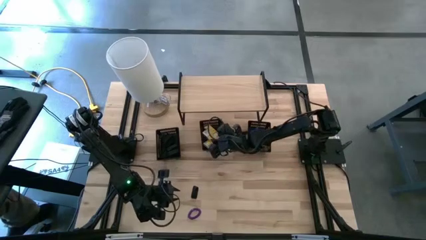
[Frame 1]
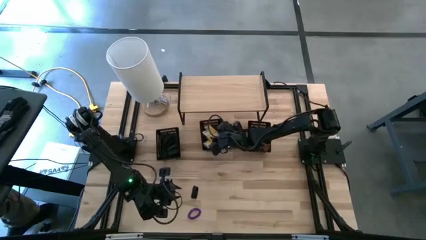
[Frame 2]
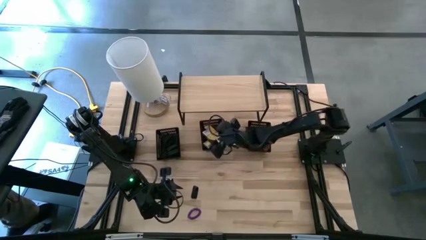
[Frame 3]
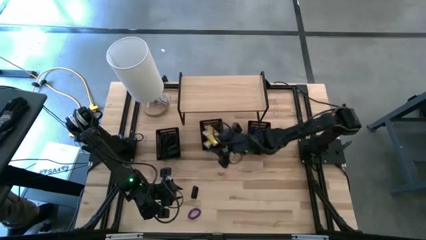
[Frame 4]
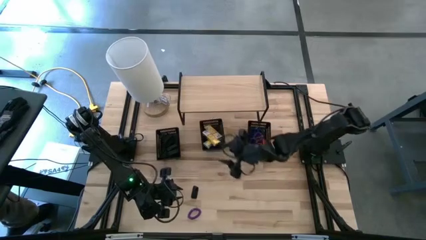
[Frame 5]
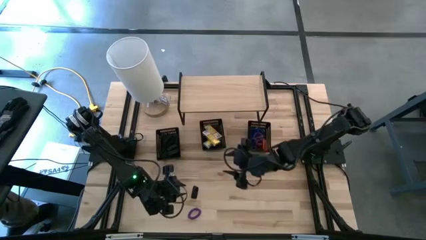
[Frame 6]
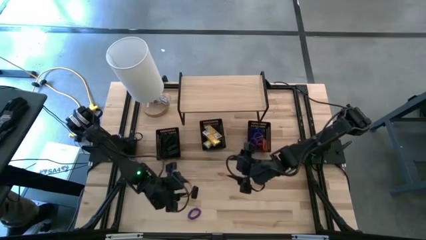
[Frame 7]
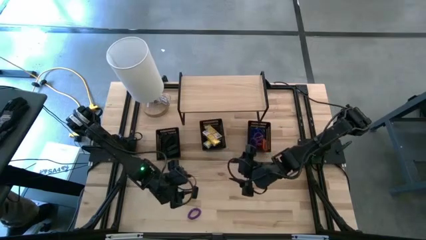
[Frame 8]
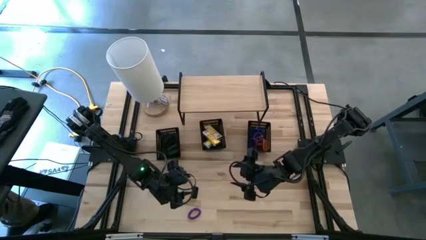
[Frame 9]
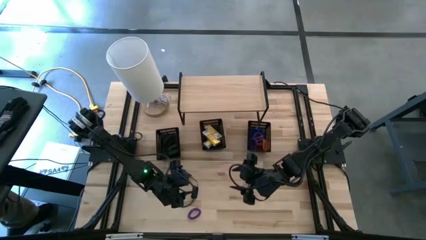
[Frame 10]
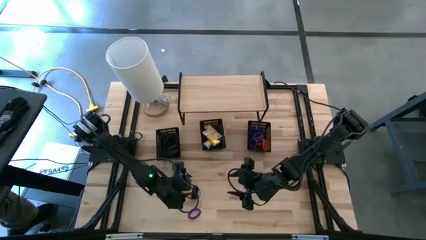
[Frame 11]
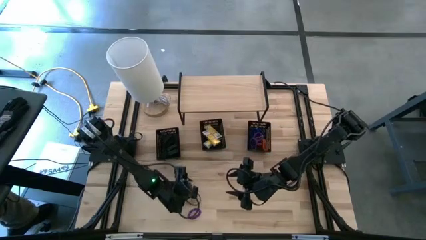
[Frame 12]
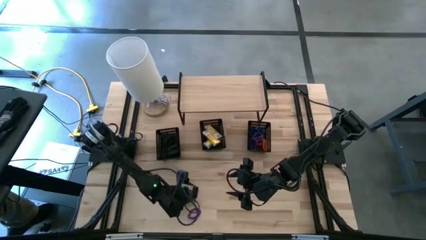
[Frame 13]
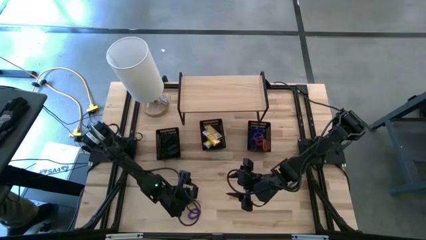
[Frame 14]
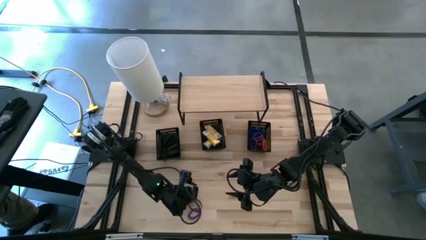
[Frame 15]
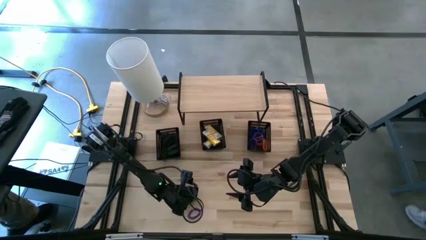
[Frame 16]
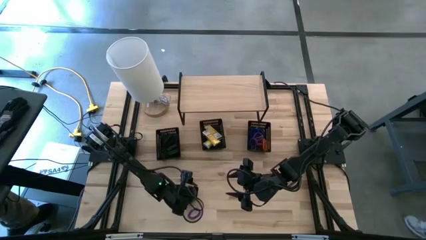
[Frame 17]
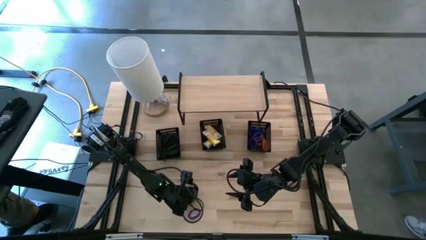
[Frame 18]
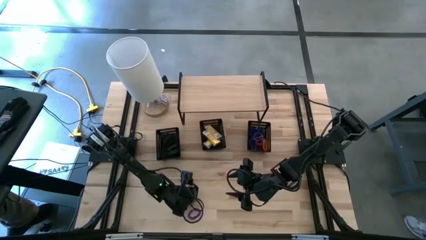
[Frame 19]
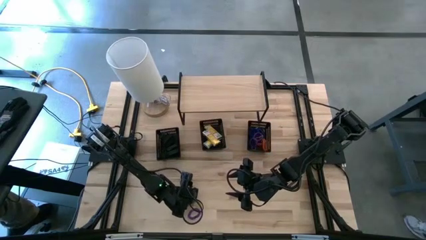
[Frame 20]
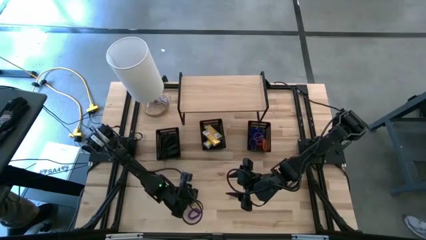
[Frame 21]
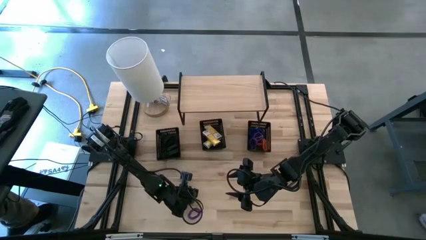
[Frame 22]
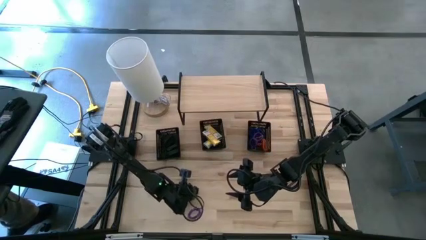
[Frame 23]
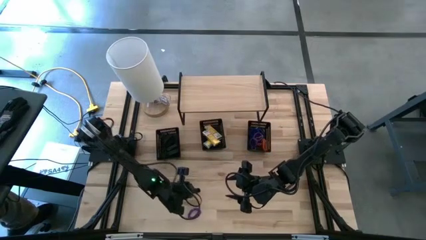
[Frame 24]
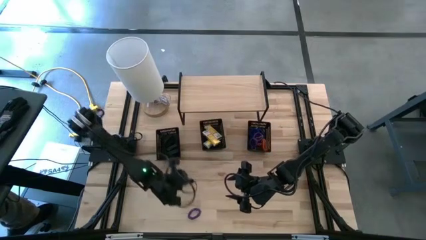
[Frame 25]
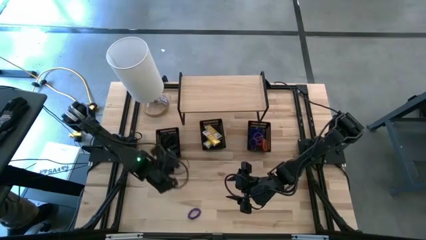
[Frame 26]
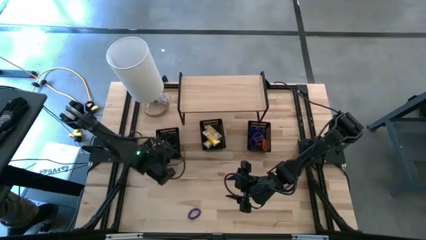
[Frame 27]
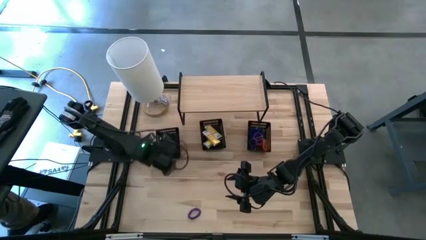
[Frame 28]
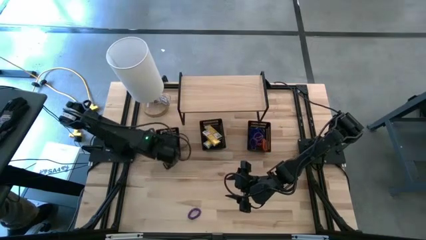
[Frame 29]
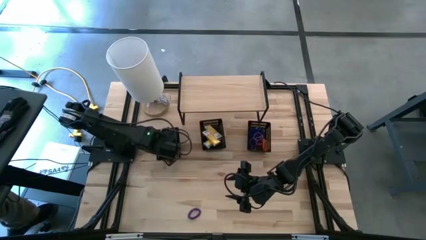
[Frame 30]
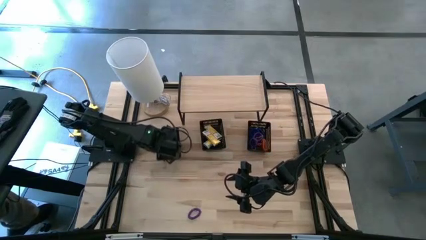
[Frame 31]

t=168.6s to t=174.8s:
Task: Pick & Place Office Desk Supplies
Put the black rubber band into the left black bin

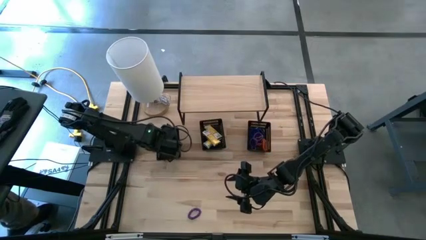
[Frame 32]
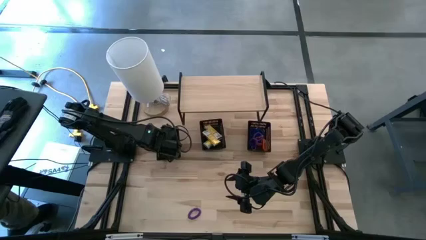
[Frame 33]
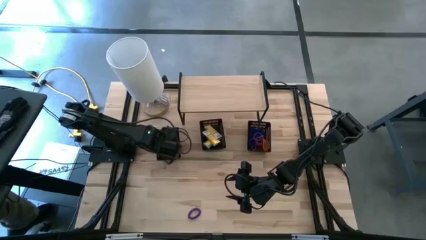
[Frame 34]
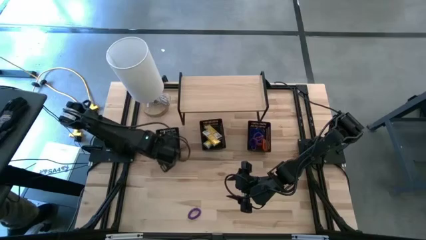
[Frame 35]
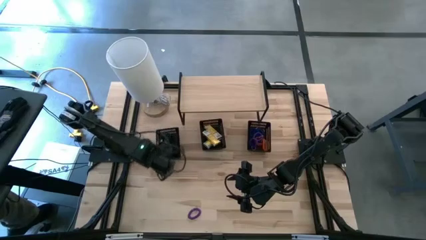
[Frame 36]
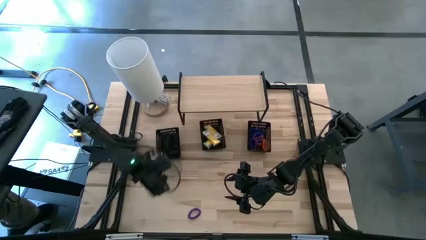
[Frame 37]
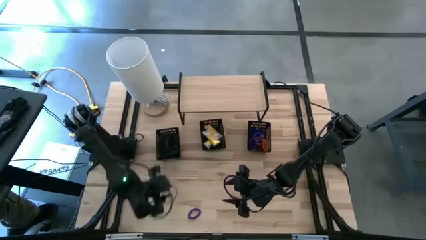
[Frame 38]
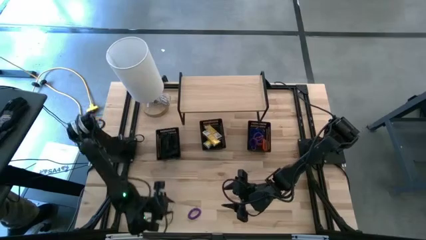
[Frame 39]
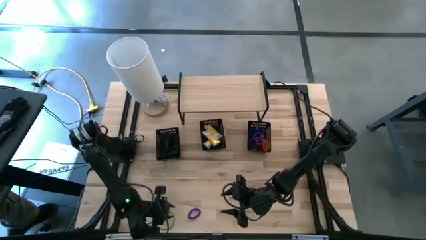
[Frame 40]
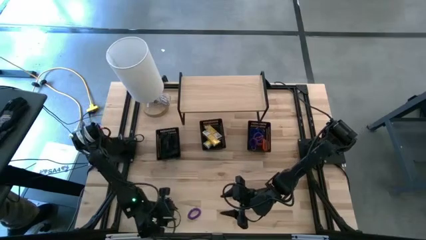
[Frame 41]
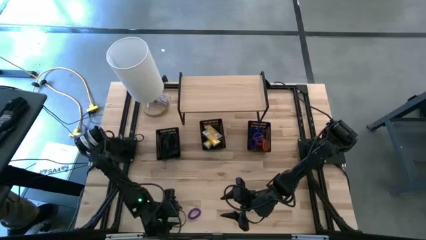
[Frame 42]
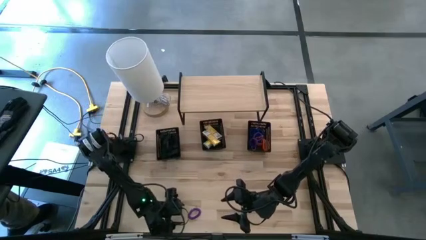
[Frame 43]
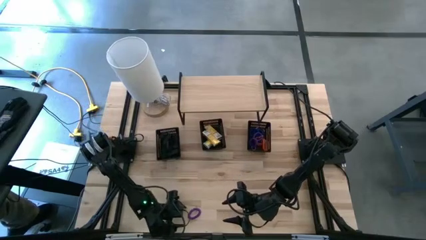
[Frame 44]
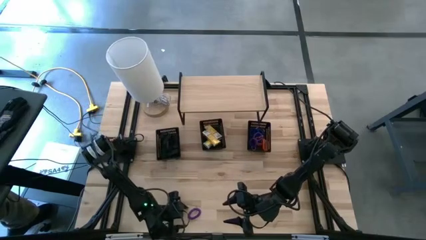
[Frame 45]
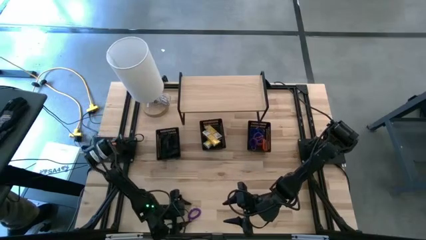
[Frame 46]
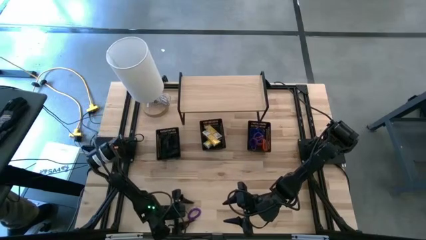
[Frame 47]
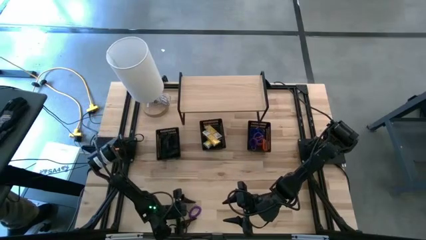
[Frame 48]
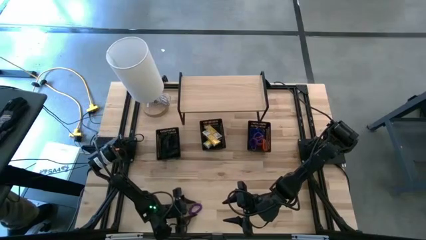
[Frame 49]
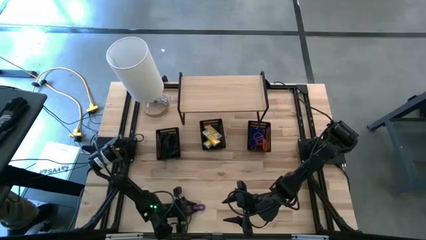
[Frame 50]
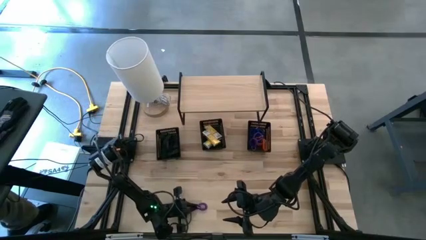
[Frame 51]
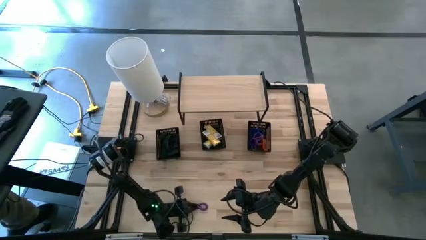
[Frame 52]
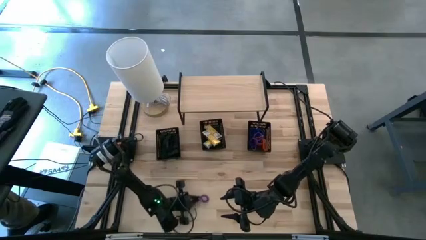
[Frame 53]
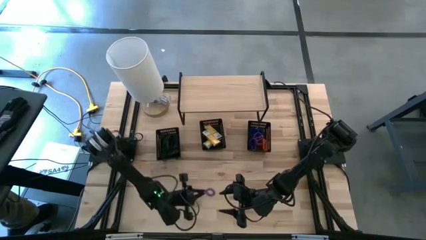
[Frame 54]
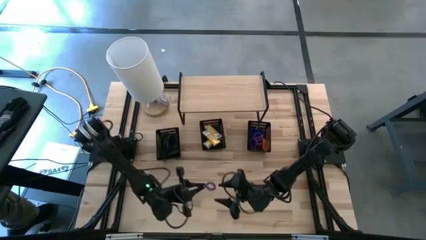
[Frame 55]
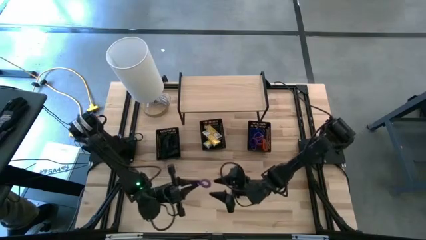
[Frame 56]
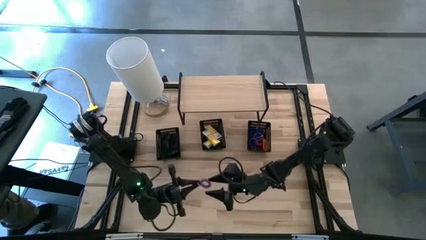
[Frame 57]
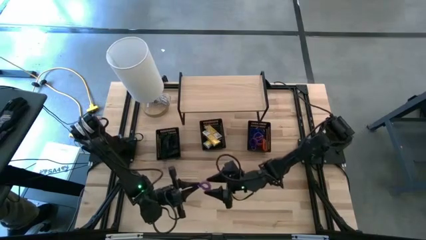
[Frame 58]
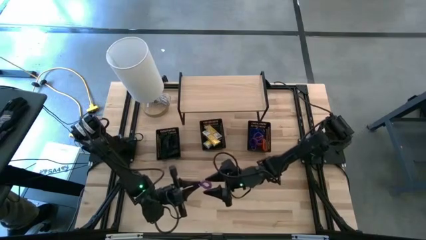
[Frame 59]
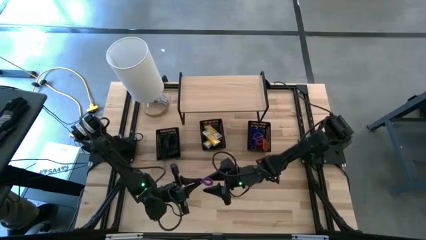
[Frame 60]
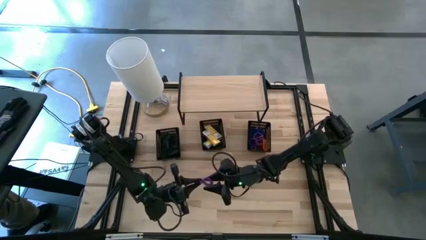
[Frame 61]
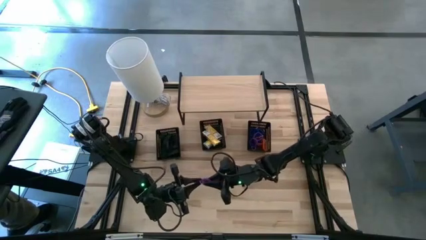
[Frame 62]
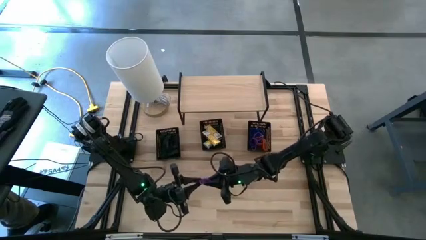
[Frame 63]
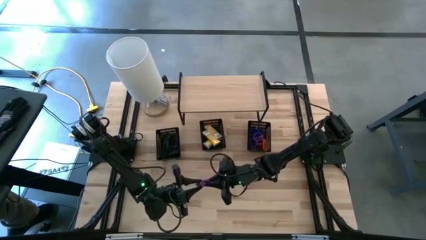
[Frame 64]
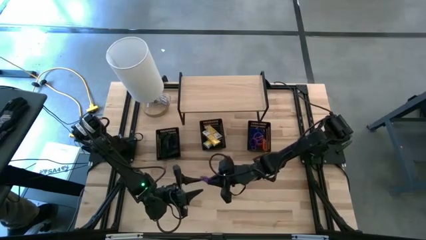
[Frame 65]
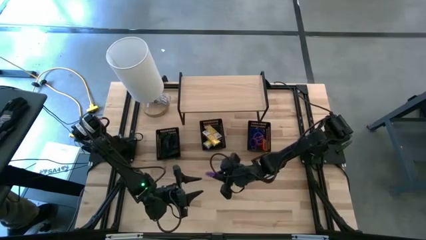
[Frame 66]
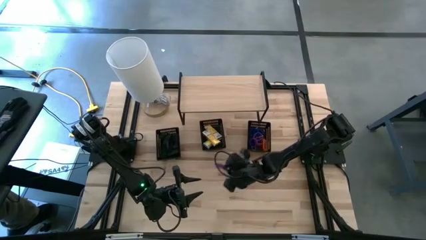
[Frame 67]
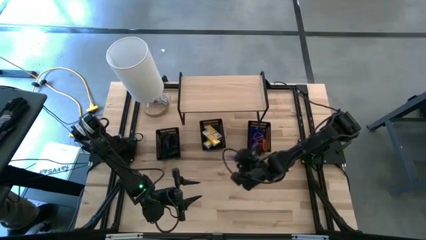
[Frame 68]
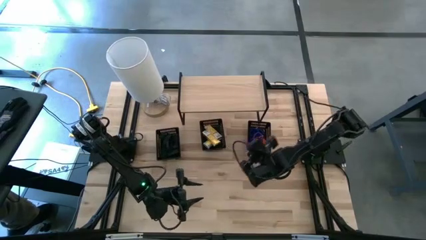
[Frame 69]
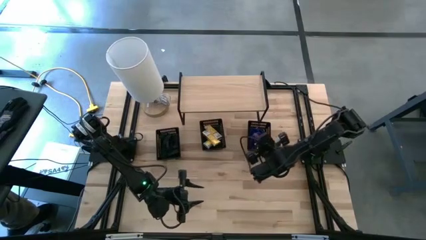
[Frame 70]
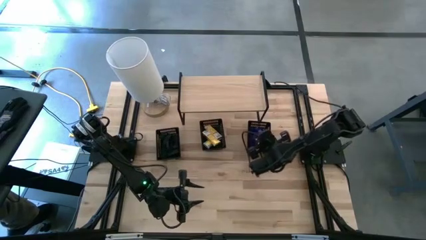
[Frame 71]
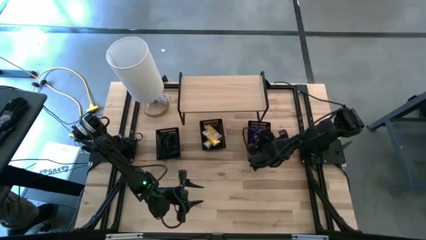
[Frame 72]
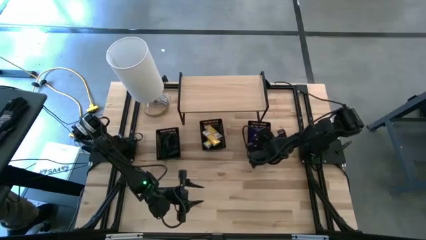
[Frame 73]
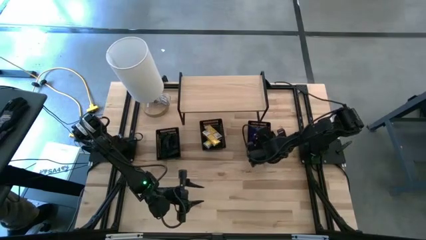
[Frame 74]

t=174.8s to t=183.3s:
Put the purple spring keychain into the right black bin

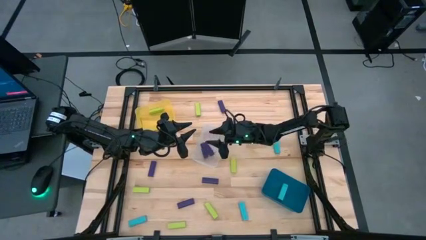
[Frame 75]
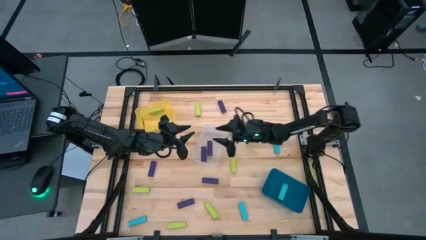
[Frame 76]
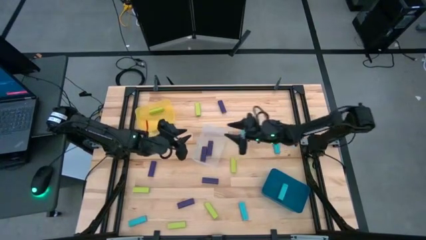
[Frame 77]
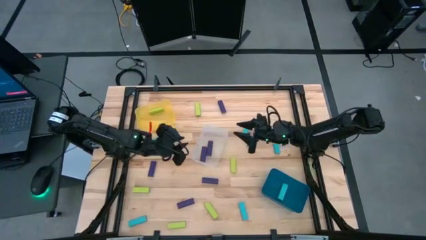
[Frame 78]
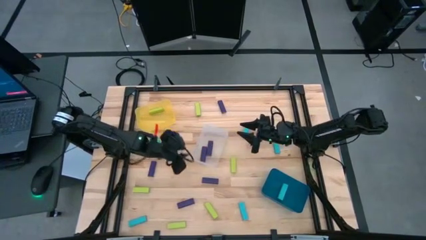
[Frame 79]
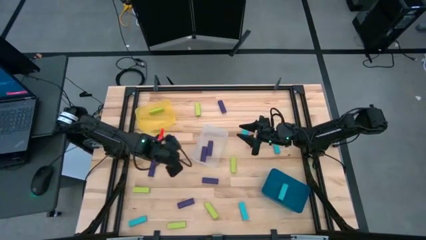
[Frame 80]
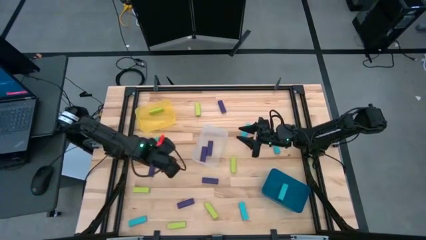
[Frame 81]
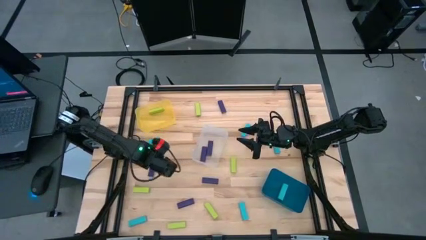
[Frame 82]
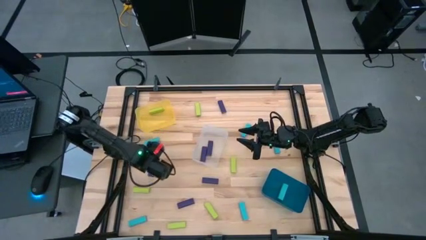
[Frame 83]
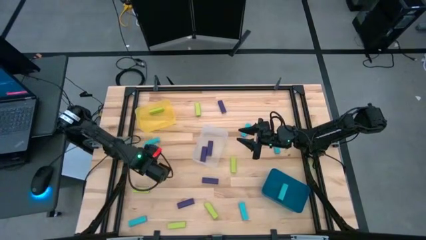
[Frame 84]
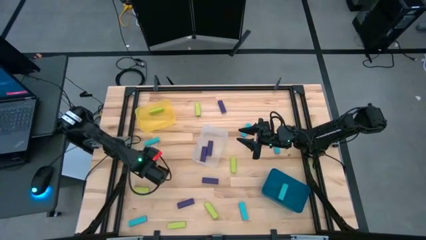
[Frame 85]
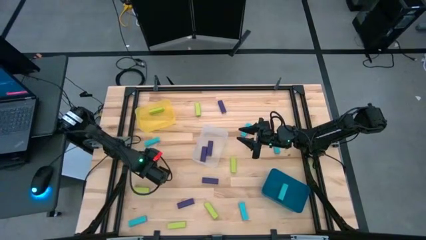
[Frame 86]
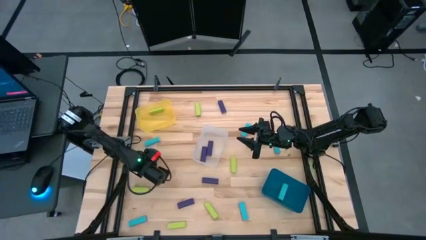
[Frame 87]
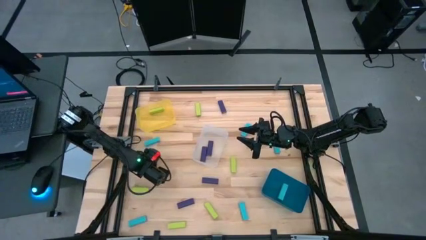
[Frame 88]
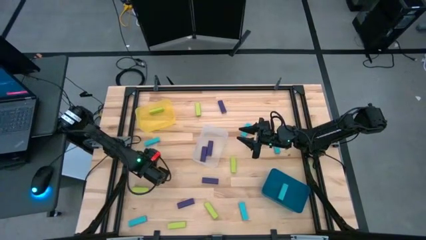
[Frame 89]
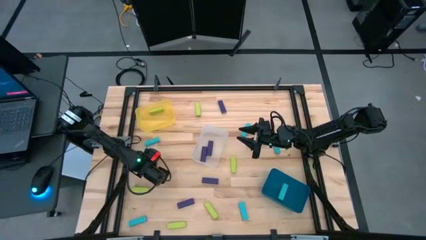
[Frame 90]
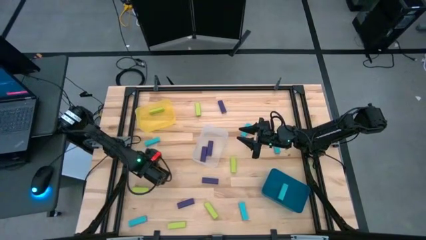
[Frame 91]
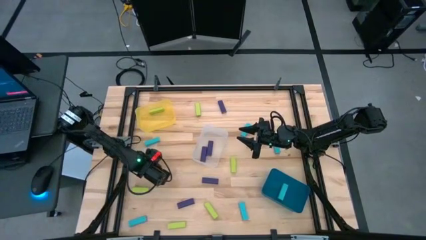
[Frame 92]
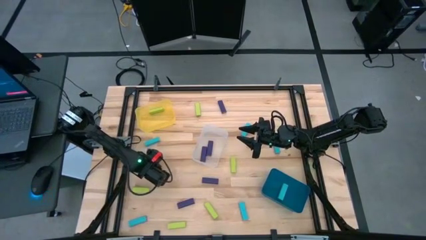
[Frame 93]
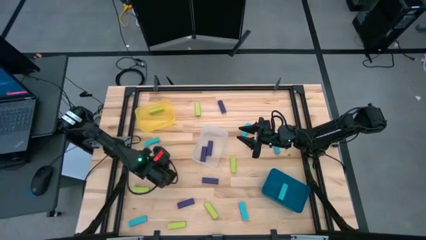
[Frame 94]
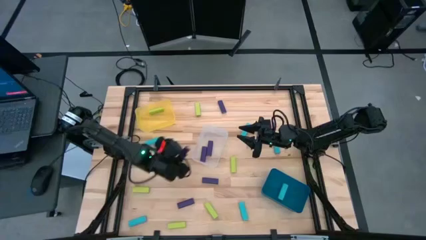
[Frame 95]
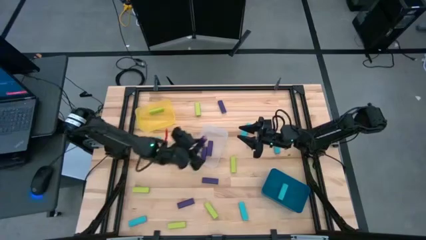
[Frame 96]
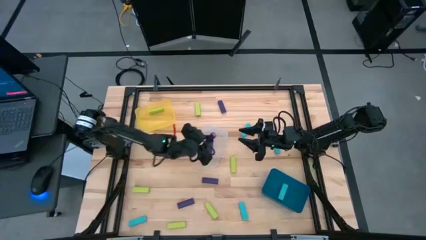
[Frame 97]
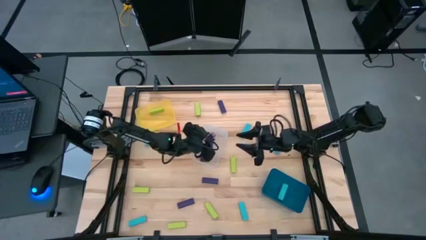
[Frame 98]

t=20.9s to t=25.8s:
Task: Sort blocks
Put the violet block into the transparent bin
